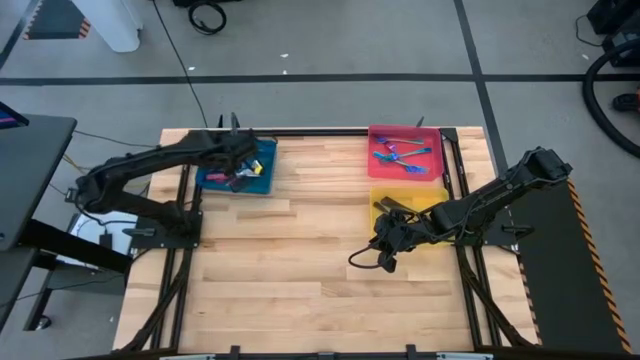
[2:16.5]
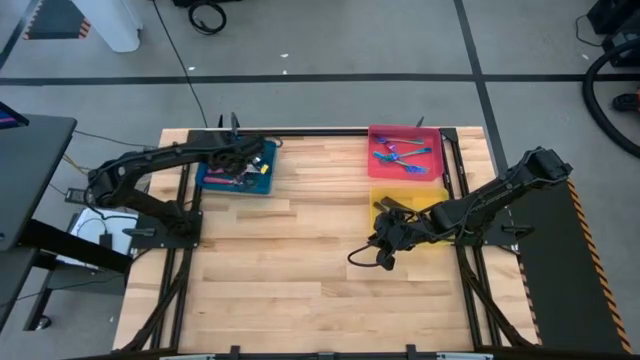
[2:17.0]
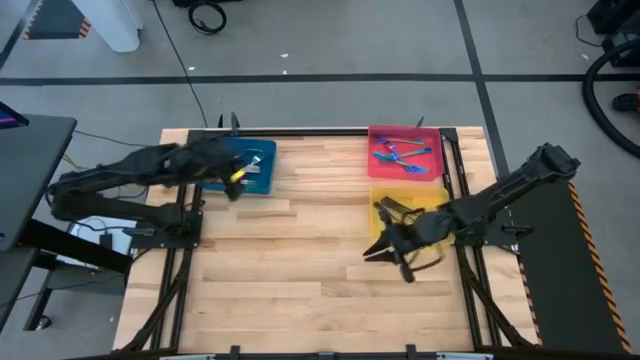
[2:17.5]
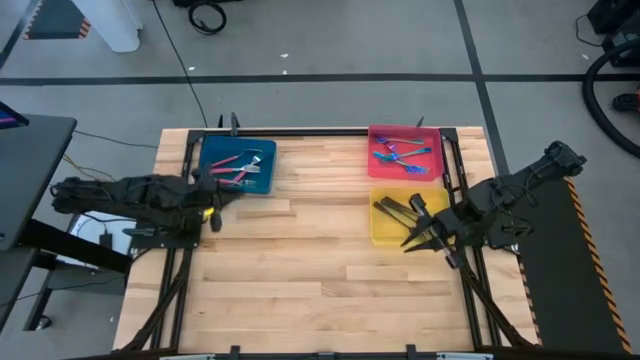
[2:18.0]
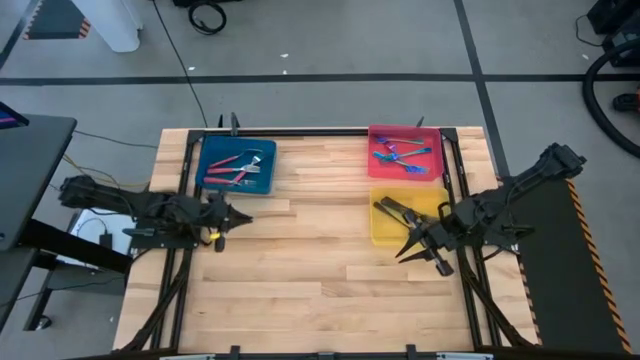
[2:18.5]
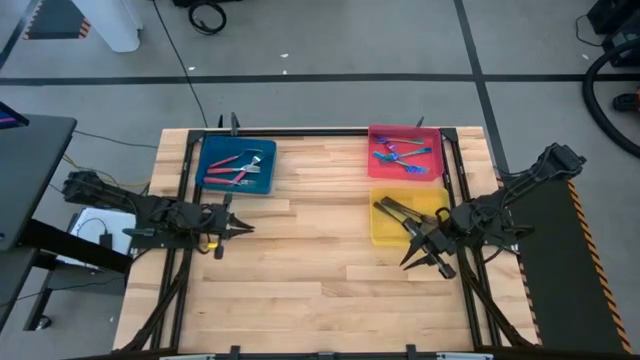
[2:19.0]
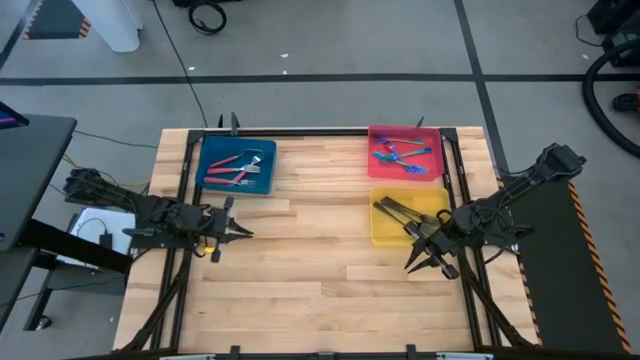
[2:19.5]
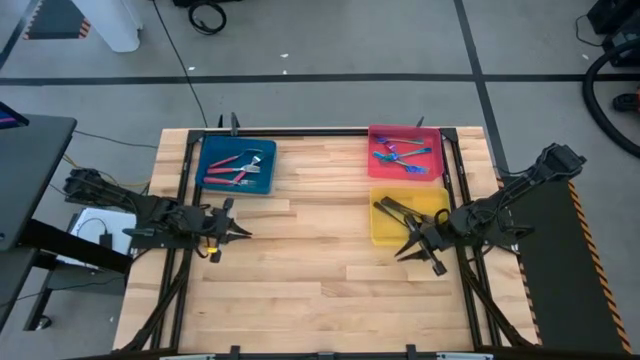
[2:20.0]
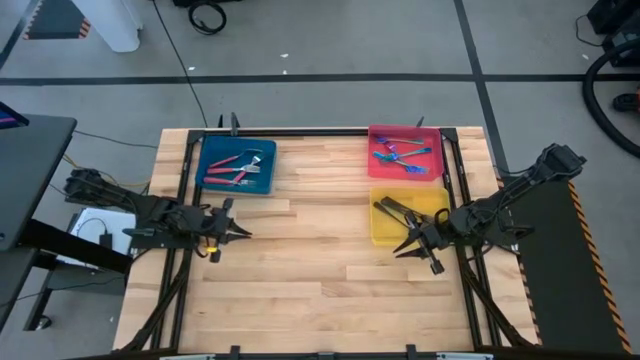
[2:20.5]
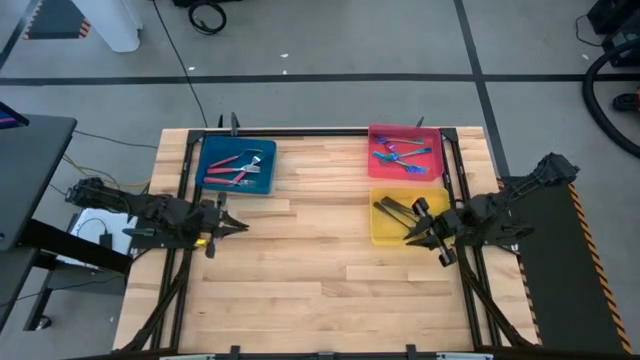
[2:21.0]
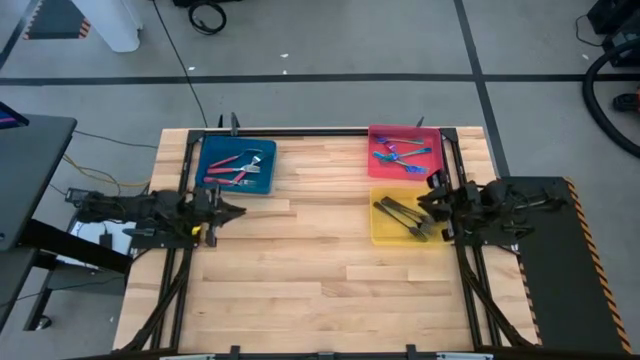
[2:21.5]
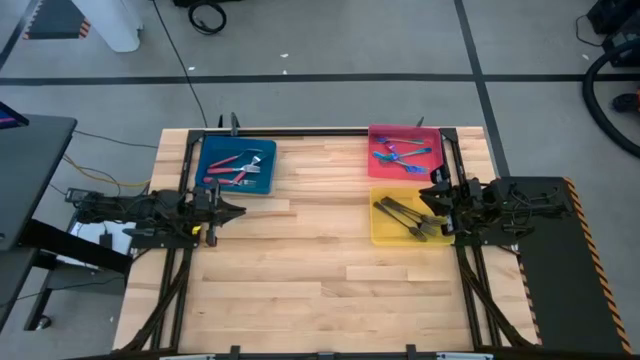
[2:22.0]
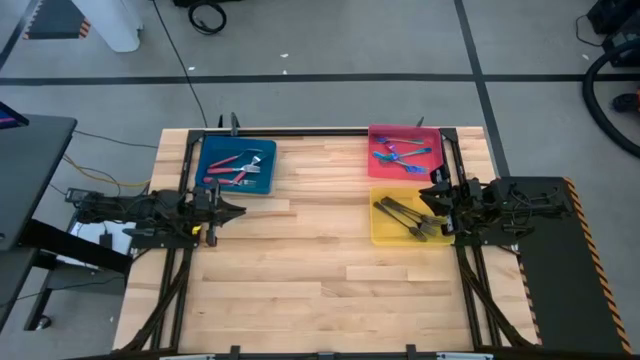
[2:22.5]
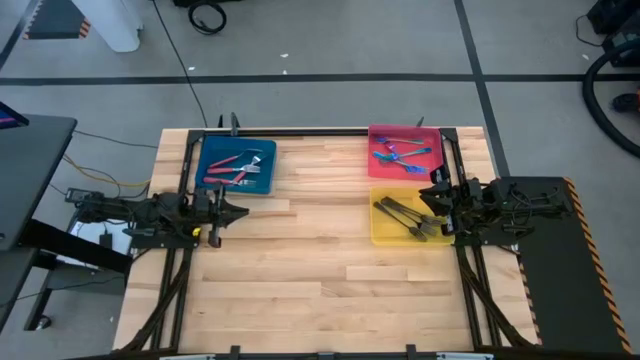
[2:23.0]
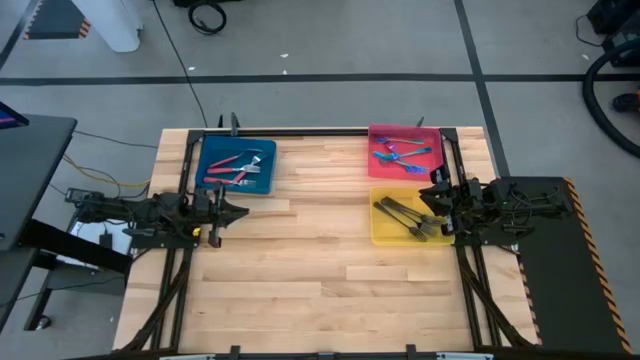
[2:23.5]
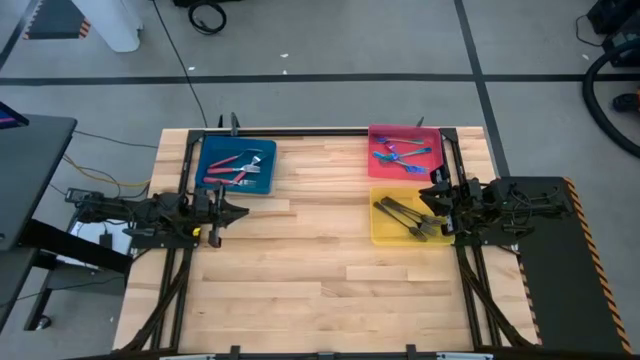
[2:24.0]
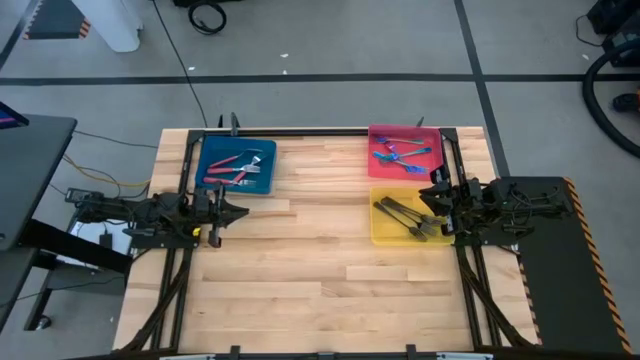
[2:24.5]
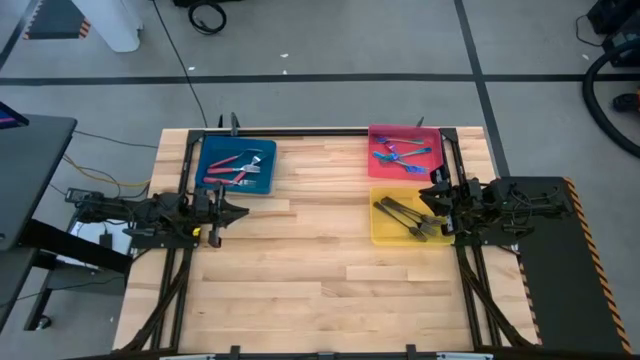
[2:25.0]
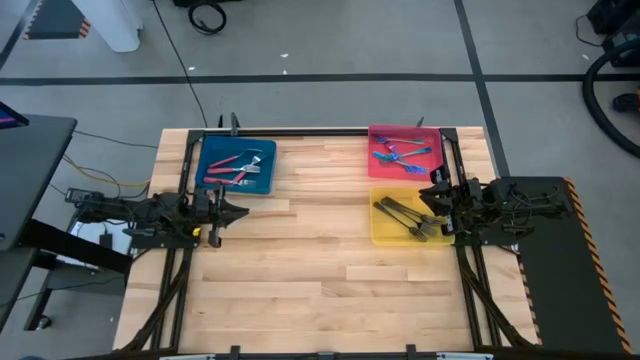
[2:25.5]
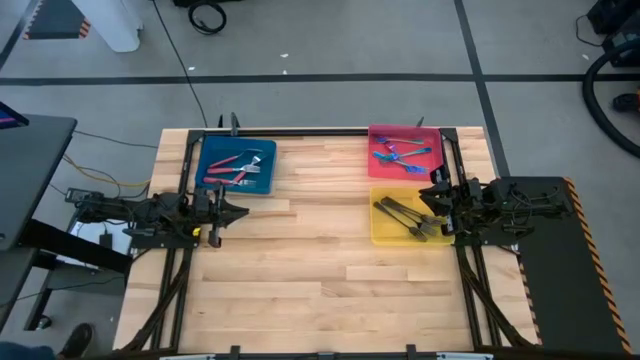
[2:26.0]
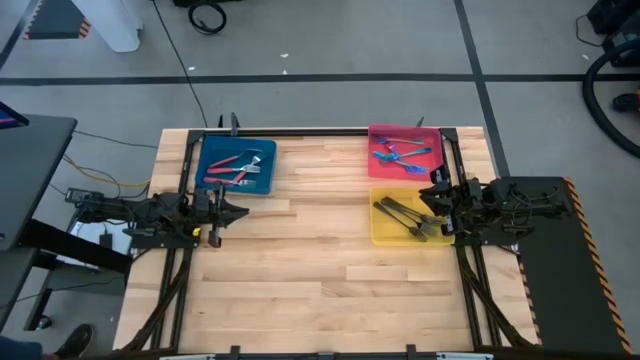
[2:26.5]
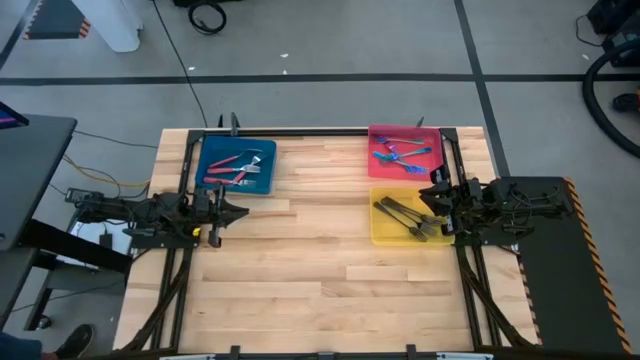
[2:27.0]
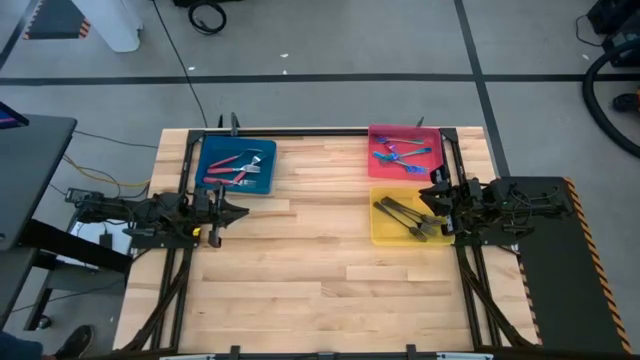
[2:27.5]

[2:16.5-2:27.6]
Task: Sort silverware by color (type)
Return to Home Position

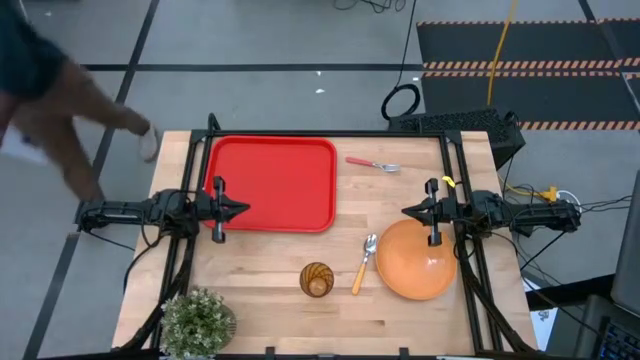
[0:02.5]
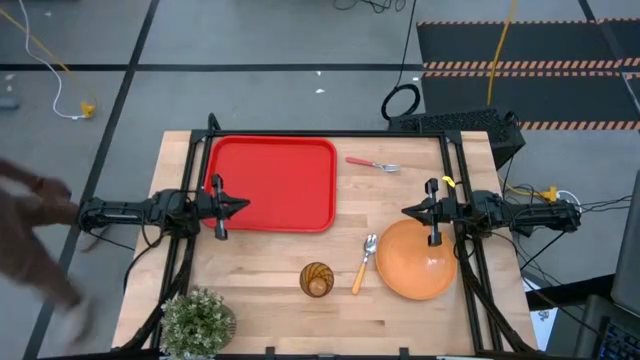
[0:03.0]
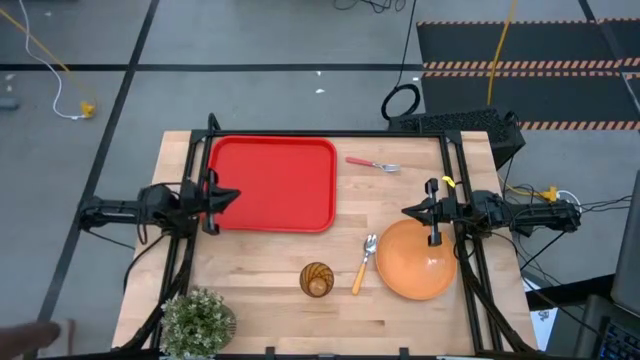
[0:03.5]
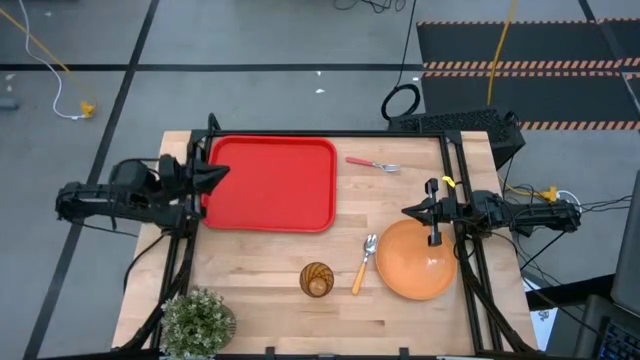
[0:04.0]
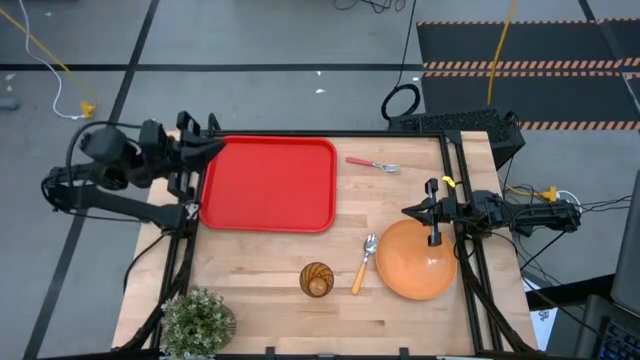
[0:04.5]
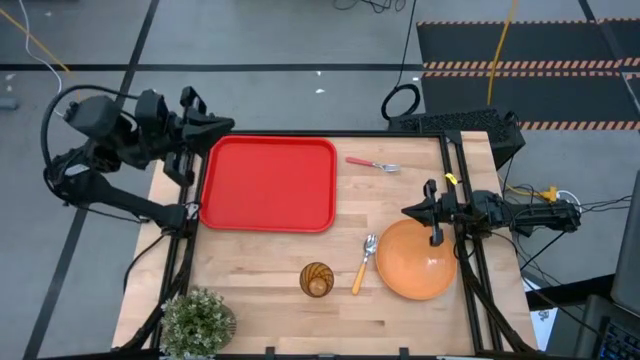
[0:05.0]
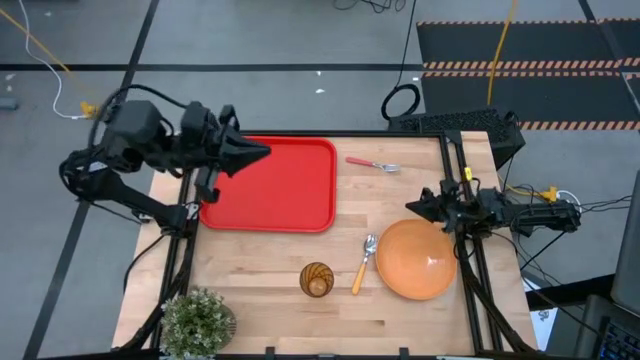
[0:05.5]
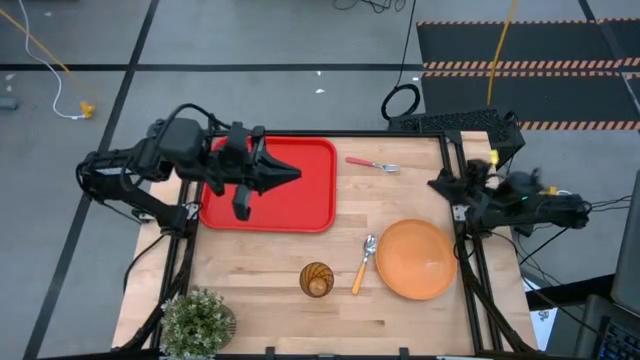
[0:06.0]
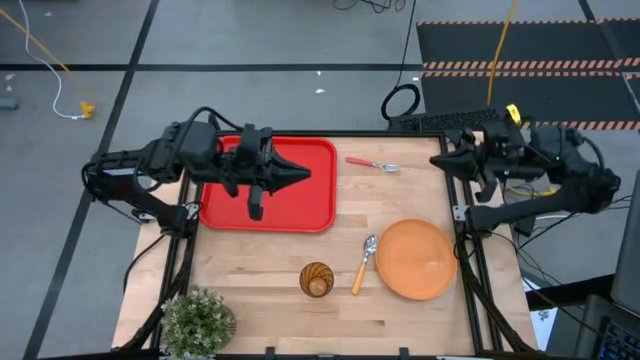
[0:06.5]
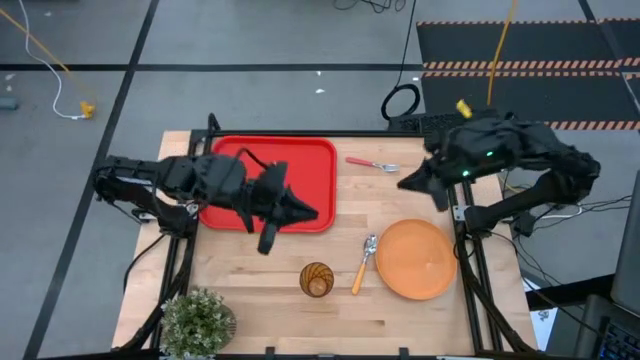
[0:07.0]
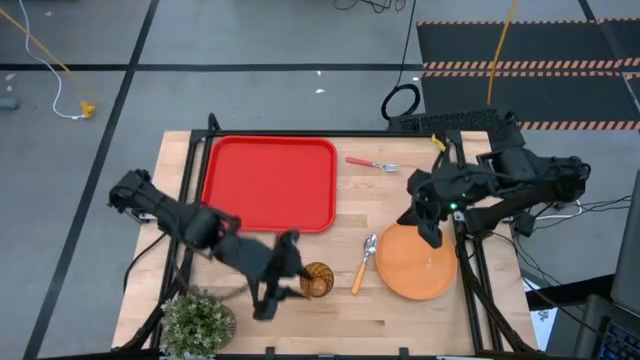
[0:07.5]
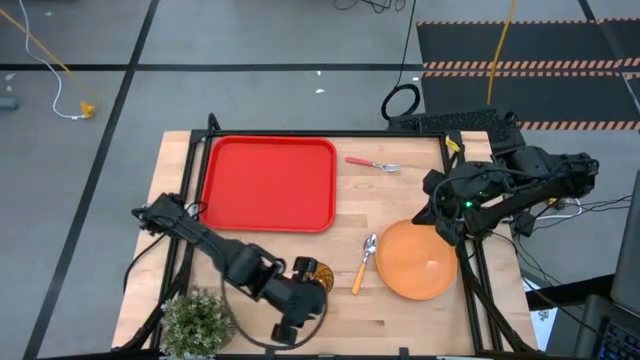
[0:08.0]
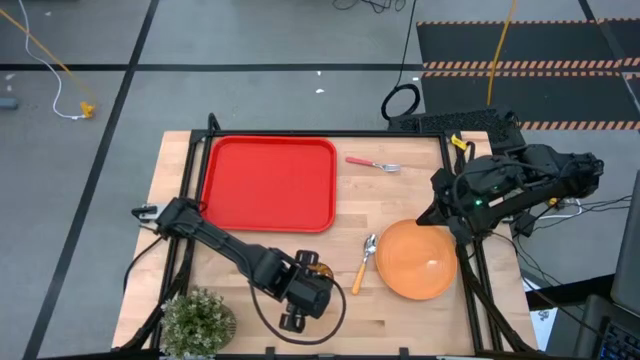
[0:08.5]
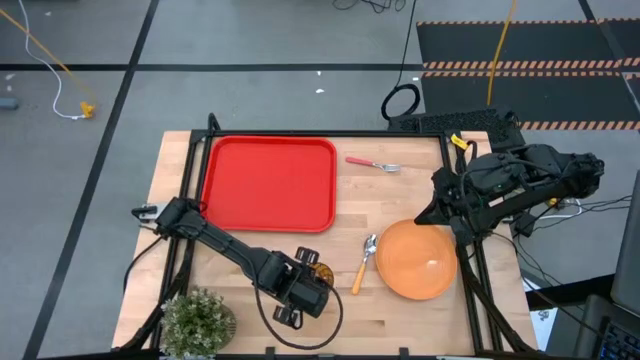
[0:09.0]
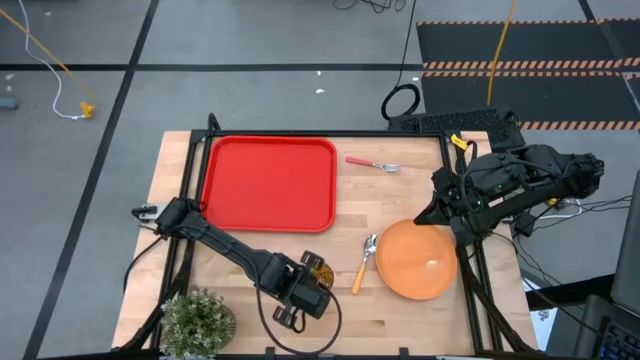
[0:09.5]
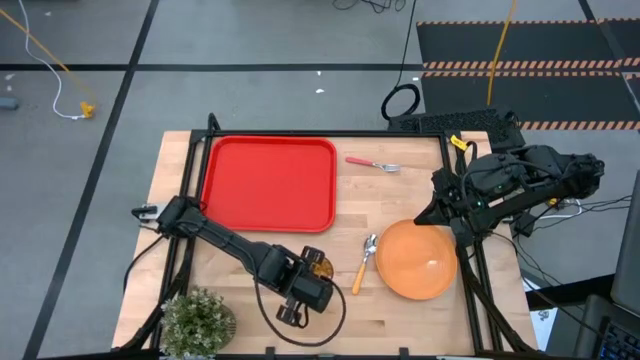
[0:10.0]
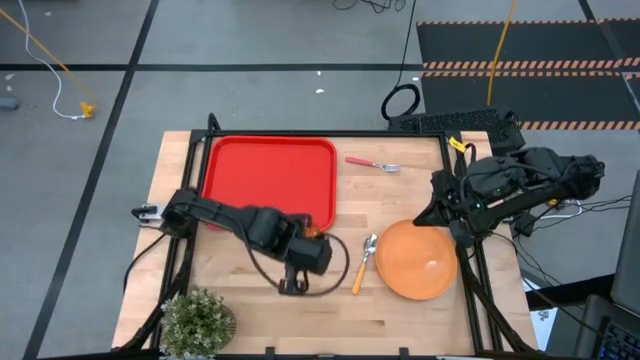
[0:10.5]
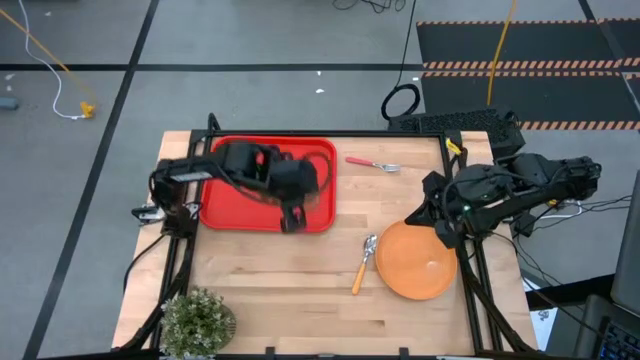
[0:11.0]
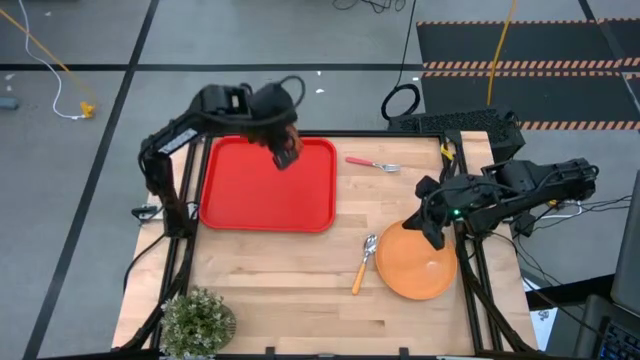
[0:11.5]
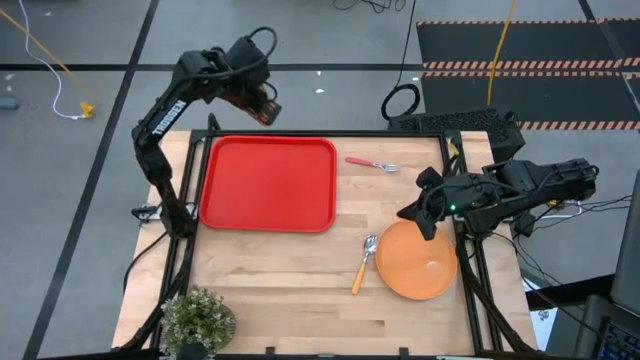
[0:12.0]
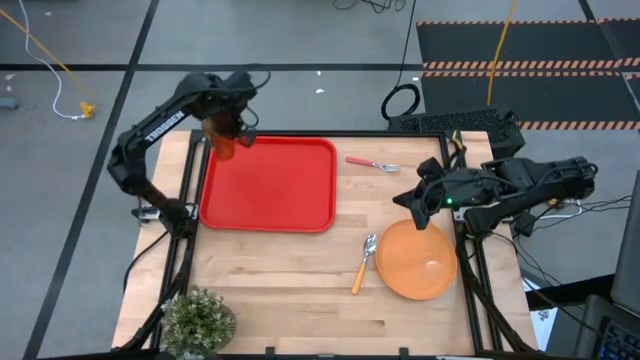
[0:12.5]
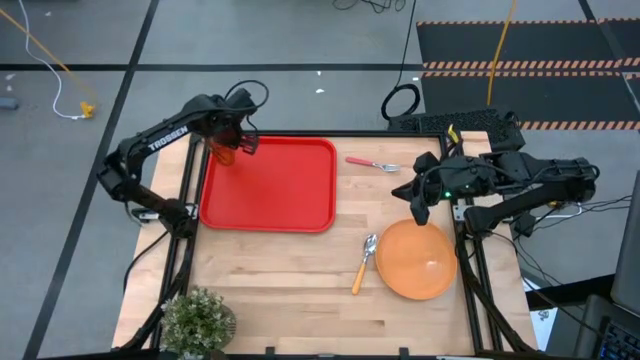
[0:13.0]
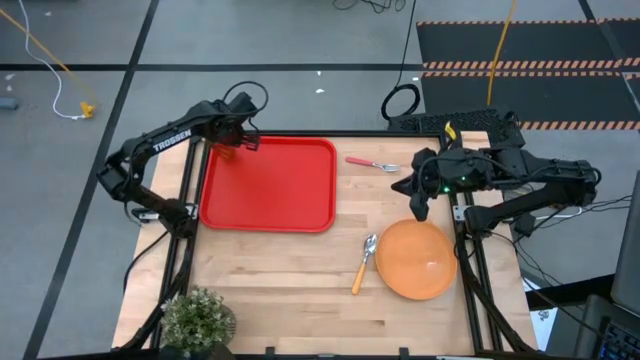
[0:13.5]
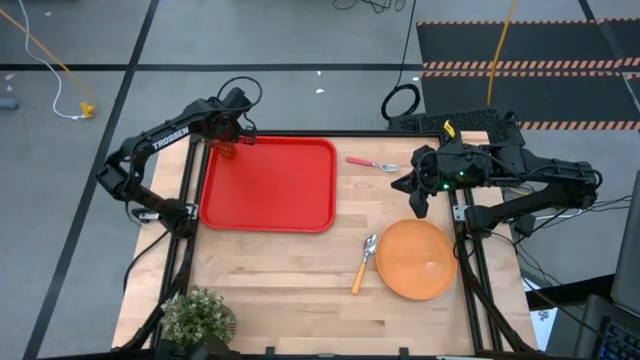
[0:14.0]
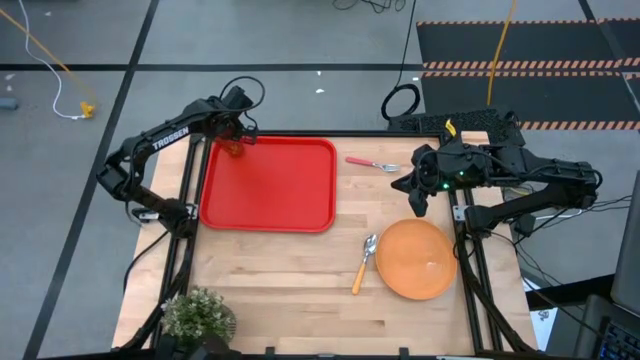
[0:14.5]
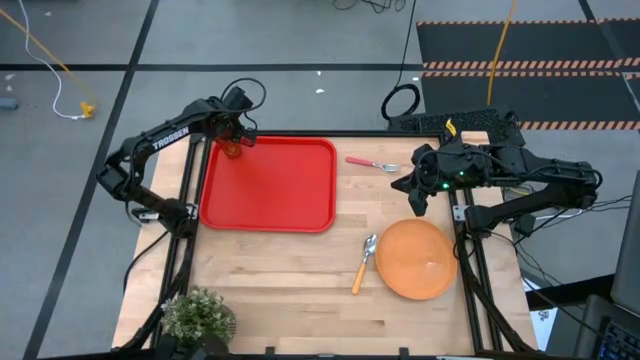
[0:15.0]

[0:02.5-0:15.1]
Task: Pick and place plate/cup/fork/spoon on tray
Put the brown cup on the red serving tray
